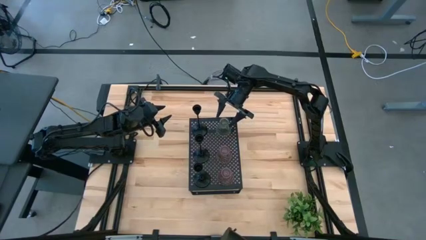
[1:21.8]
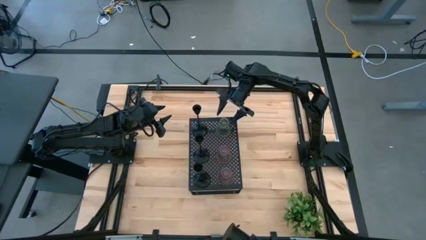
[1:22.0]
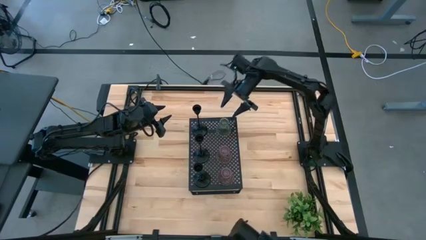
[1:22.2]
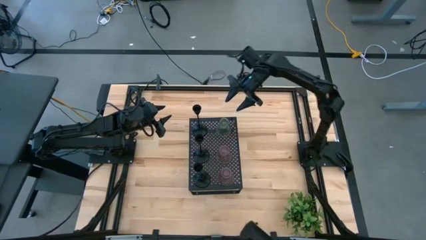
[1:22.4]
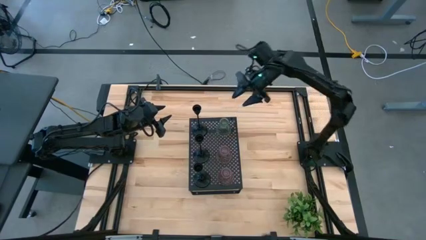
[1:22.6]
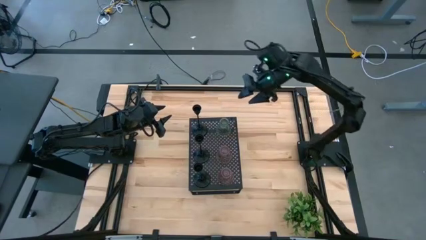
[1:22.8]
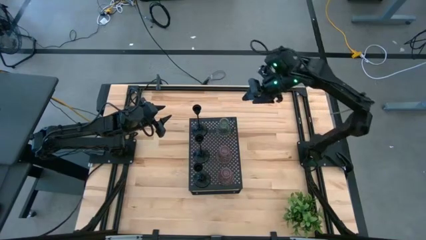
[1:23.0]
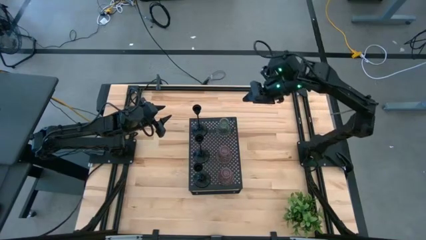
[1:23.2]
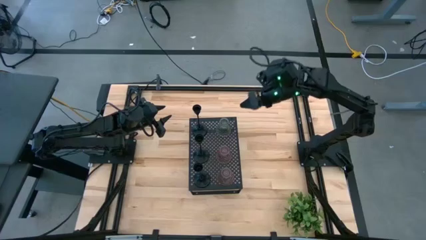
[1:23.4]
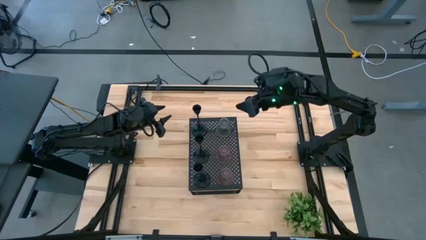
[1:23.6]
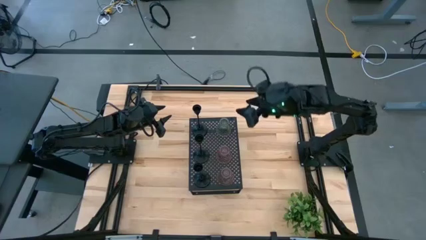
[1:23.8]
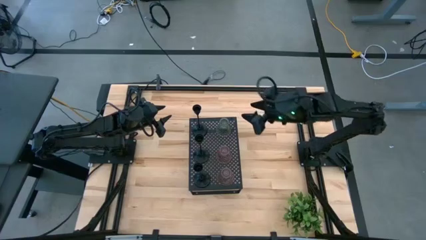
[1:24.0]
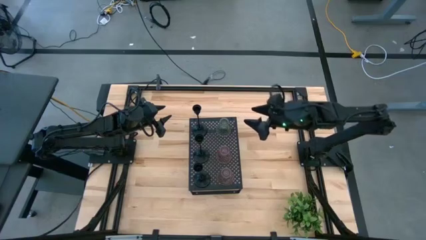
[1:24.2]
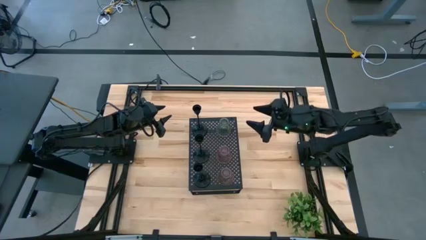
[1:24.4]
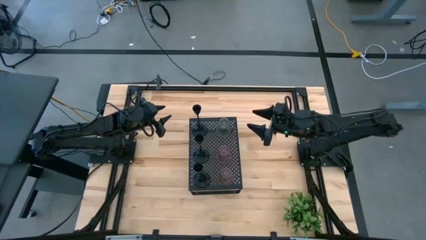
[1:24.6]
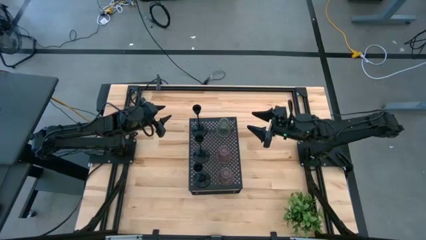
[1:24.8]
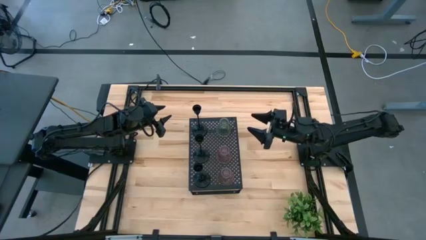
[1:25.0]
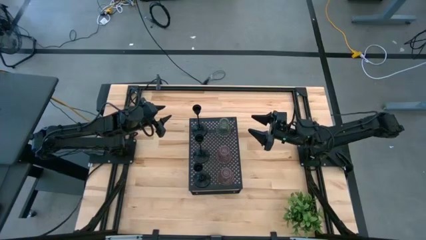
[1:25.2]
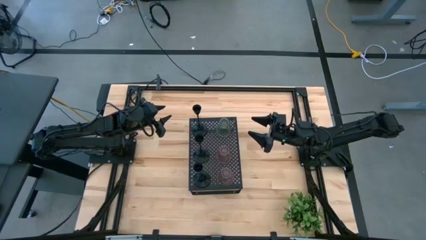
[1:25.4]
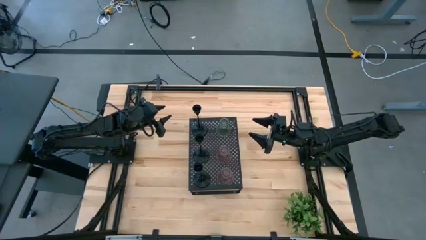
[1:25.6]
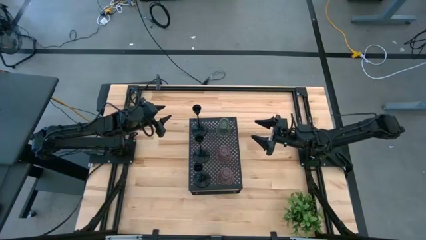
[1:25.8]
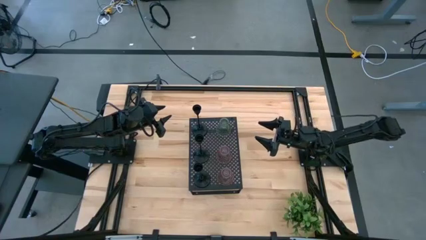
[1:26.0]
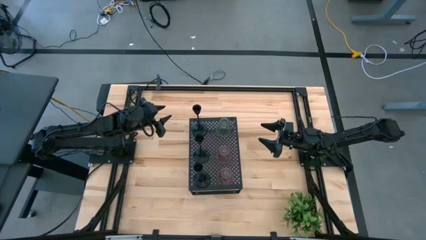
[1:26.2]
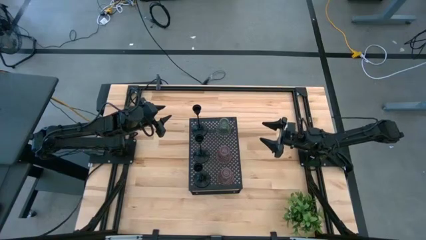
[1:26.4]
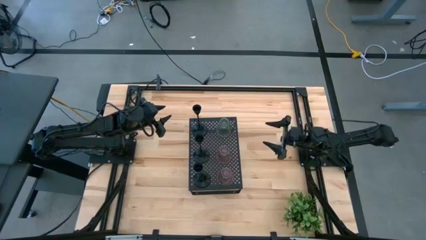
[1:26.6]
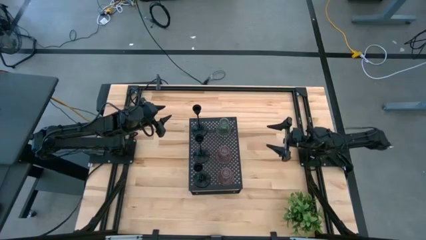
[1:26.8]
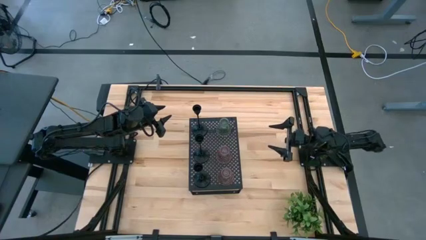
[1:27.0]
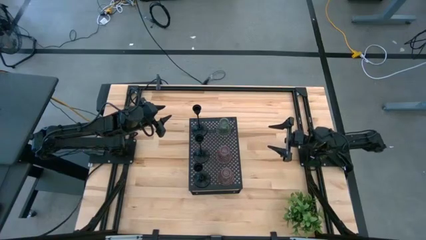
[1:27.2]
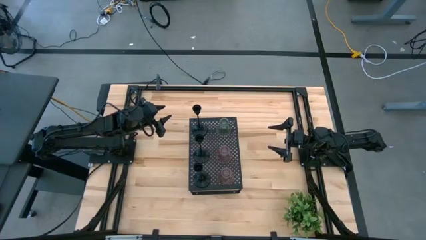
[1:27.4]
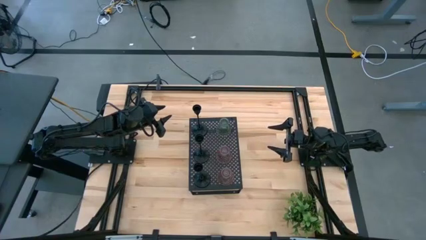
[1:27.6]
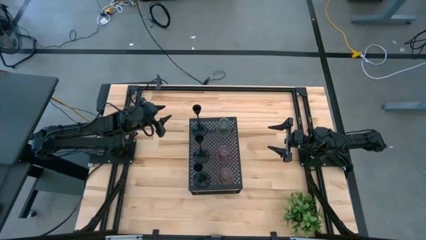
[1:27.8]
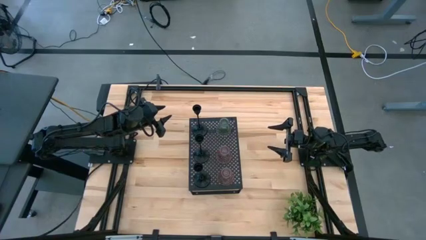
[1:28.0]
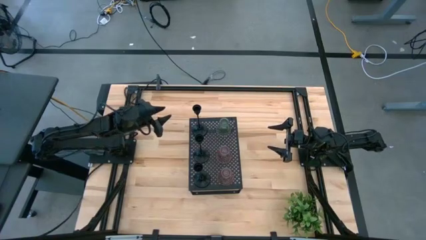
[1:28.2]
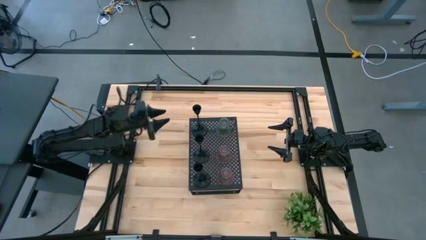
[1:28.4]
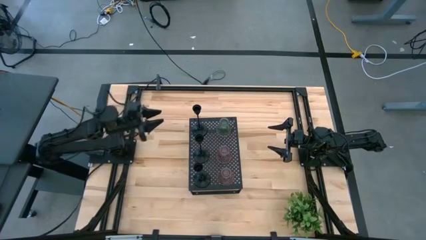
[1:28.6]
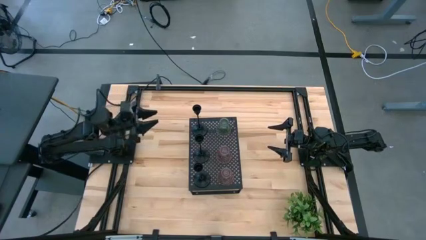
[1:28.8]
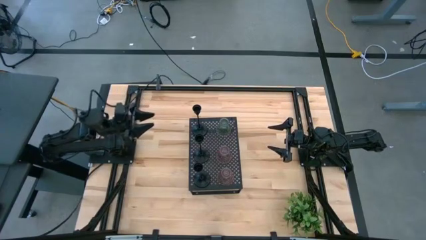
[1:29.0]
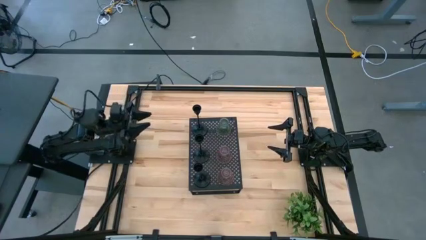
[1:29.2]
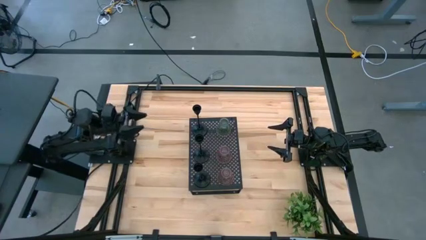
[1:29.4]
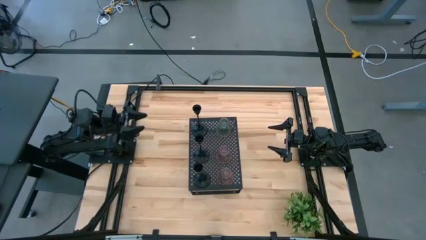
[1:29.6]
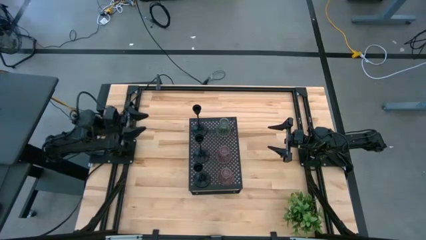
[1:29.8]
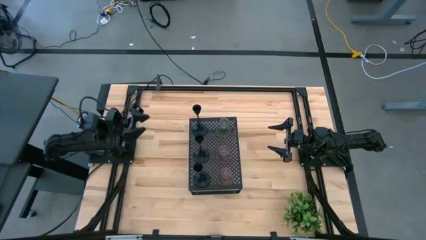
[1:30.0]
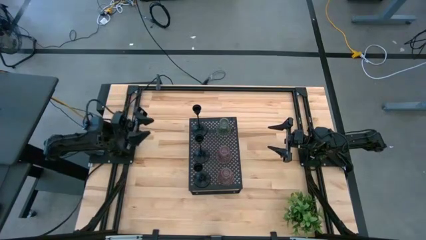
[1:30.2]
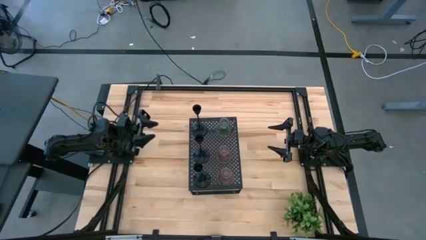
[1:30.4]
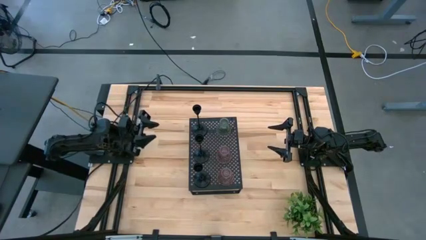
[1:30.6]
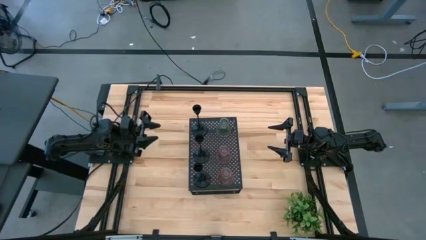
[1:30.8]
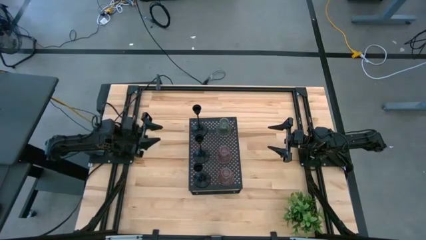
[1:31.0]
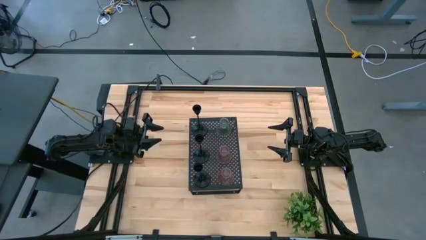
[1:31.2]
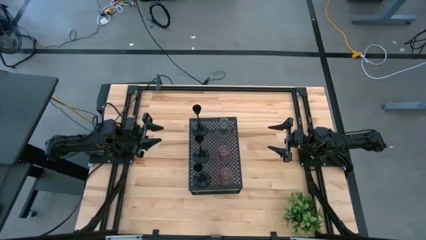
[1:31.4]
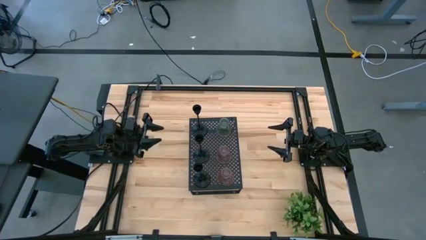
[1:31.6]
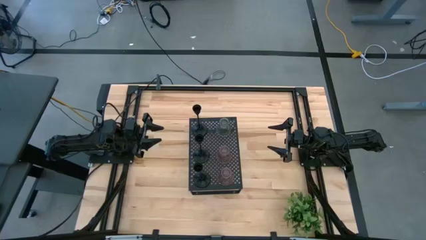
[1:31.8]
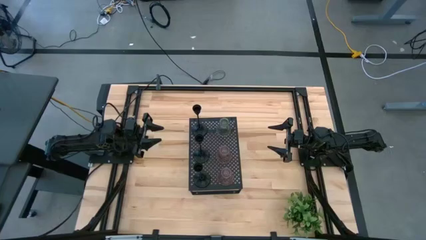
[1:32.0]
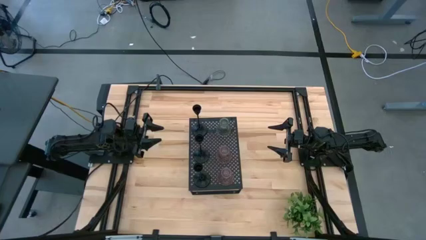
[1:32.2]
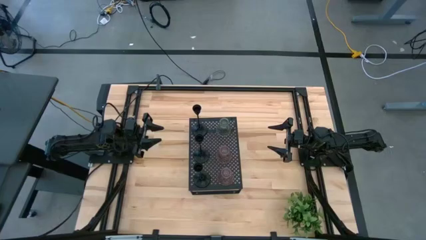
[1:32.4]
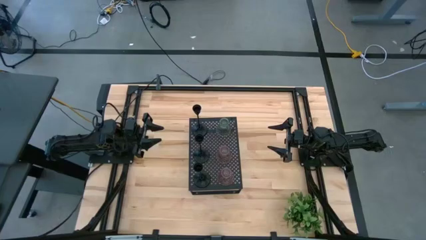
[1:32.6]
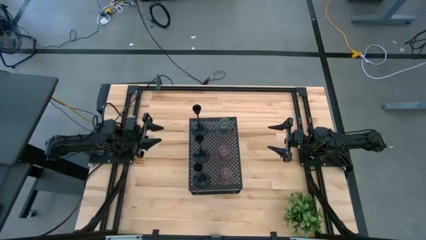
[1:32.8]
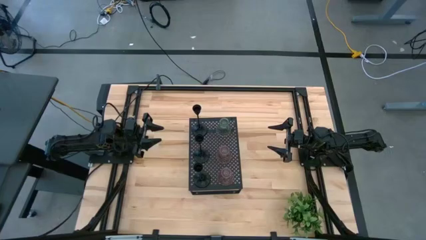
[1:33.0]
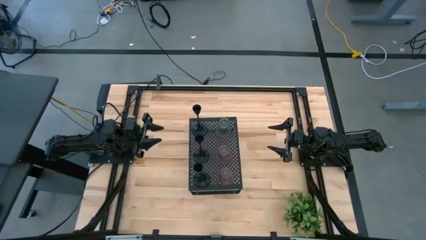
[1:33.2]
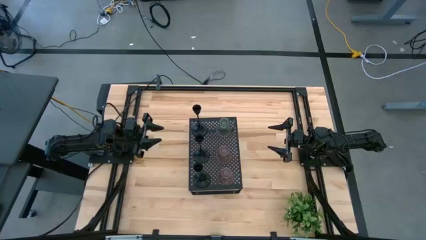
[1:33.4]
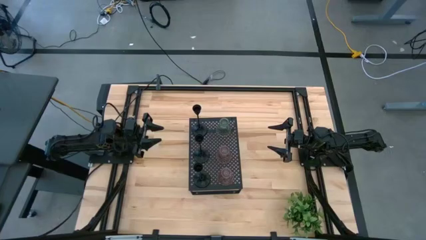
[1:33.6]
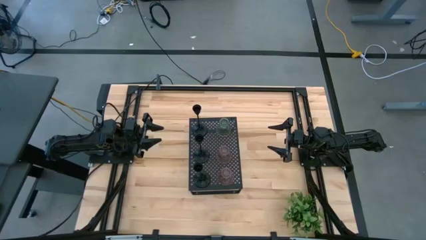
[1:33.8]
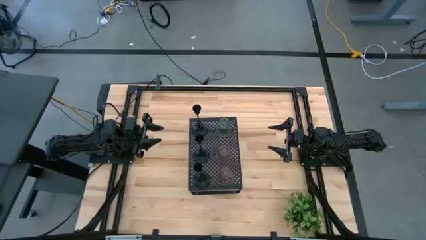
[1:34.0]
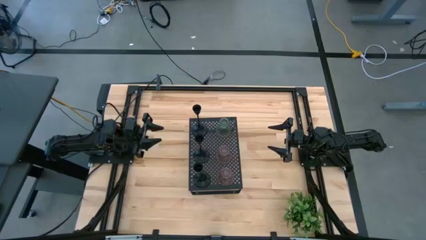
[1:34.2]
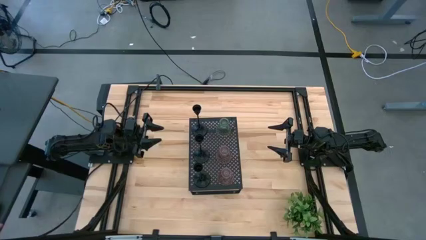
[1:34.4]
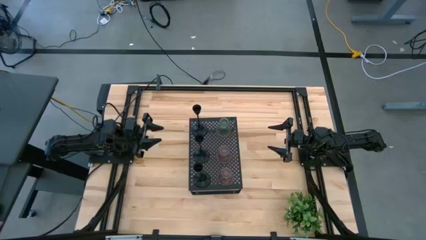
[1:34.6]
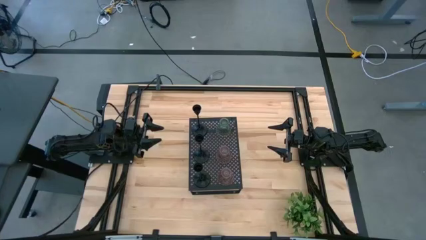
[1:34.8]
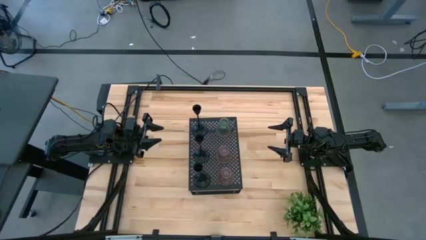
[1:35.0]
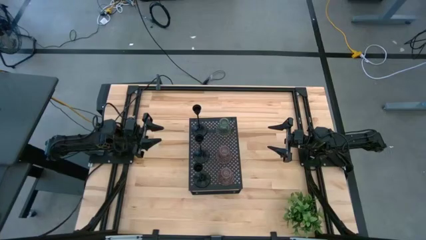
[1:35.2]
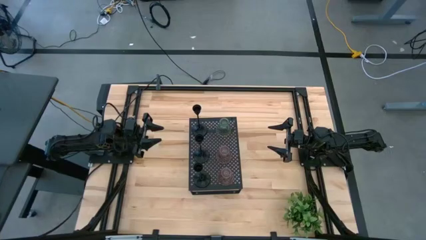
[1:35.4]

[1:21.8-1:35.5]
Task: Pick & Place candle stick holders
Return to Home Position
